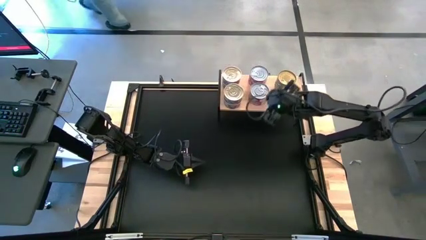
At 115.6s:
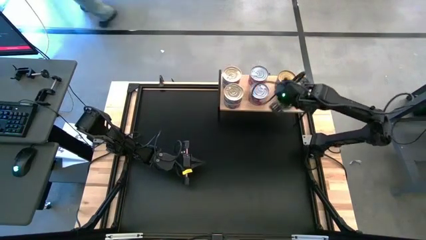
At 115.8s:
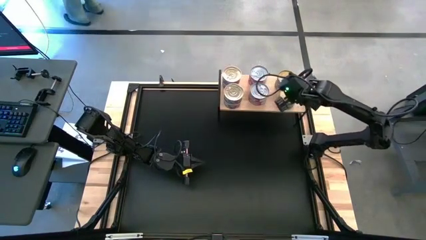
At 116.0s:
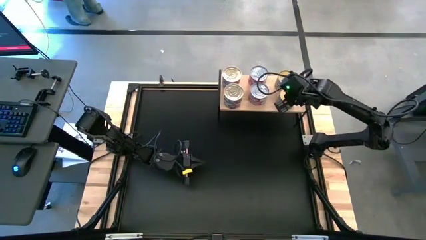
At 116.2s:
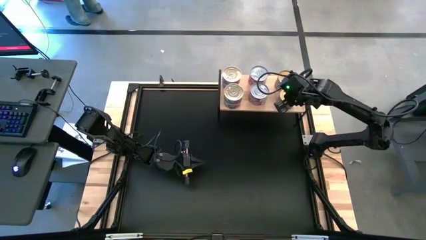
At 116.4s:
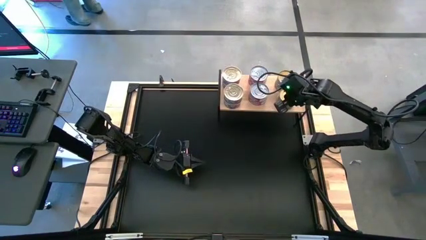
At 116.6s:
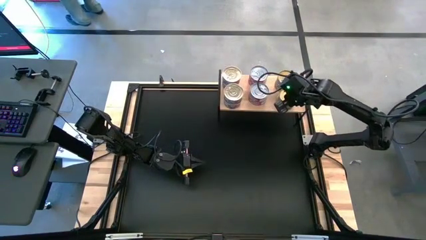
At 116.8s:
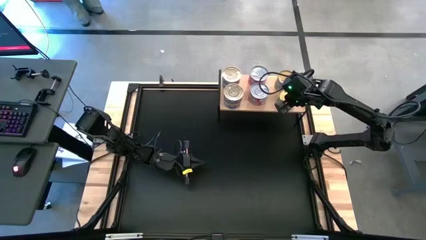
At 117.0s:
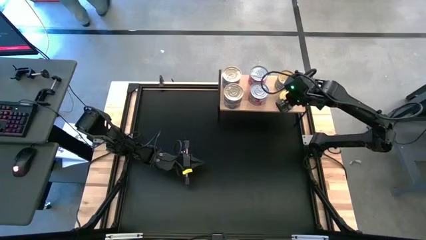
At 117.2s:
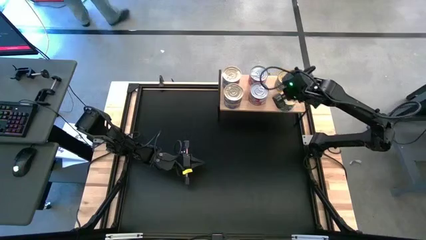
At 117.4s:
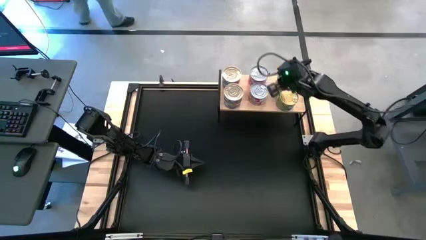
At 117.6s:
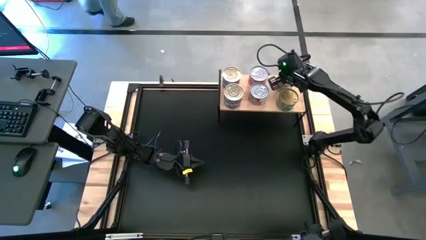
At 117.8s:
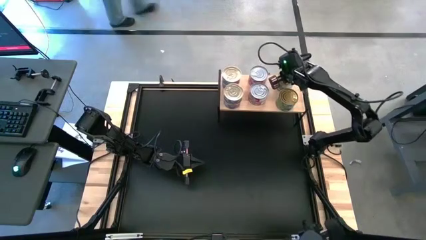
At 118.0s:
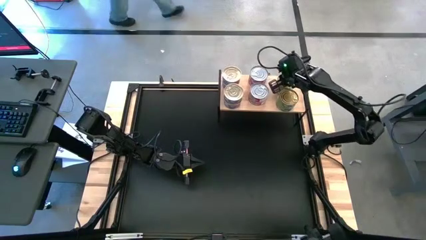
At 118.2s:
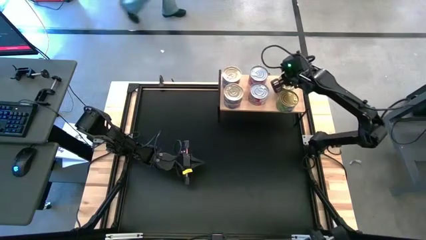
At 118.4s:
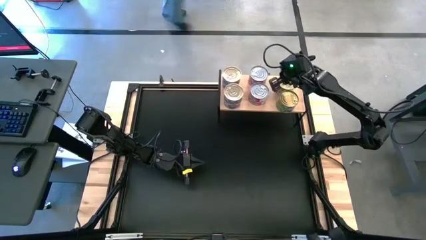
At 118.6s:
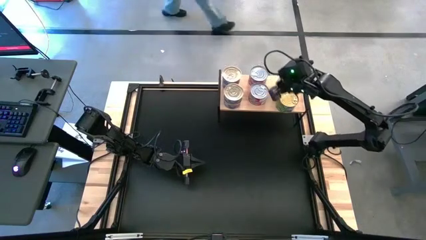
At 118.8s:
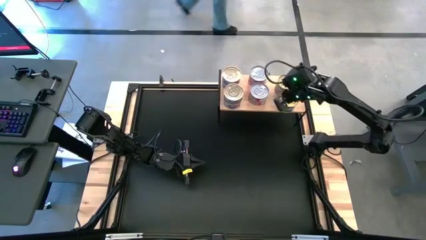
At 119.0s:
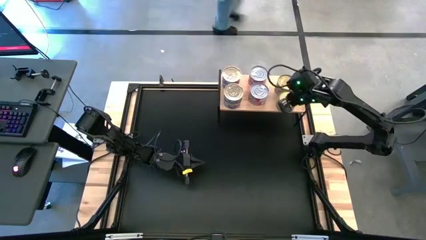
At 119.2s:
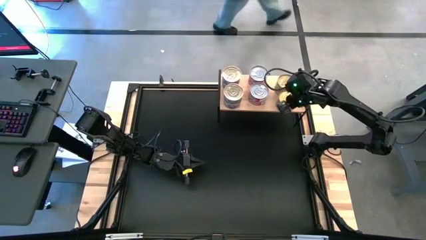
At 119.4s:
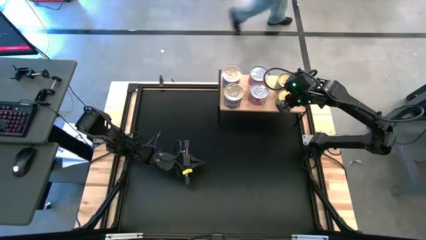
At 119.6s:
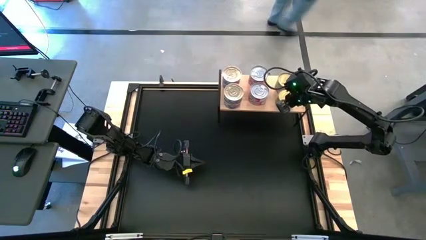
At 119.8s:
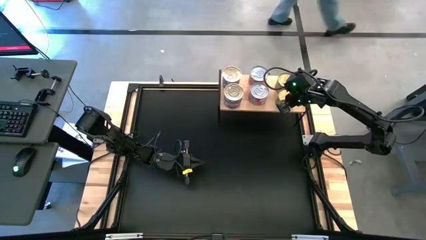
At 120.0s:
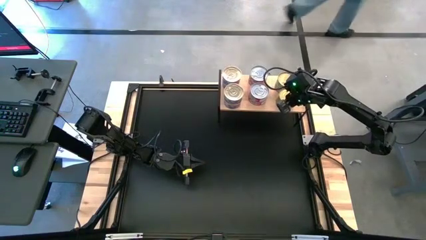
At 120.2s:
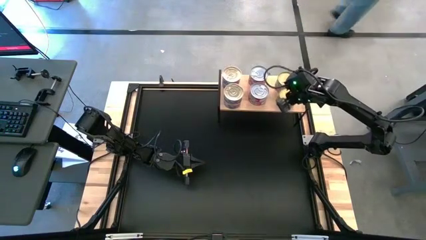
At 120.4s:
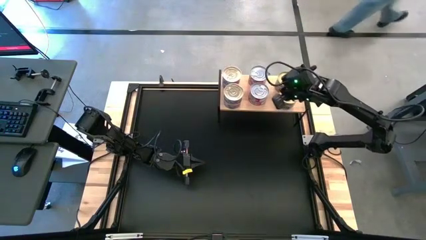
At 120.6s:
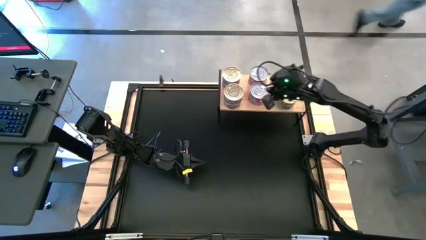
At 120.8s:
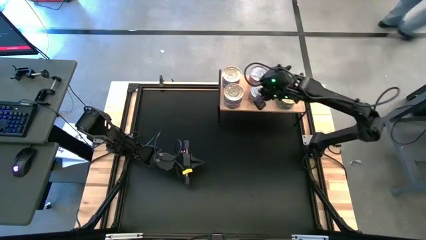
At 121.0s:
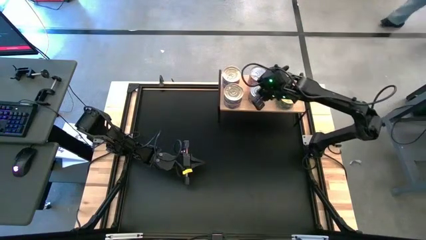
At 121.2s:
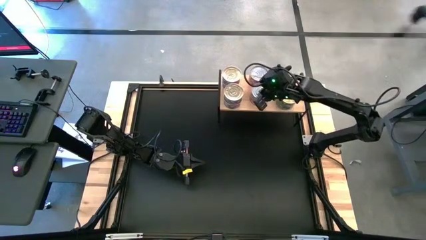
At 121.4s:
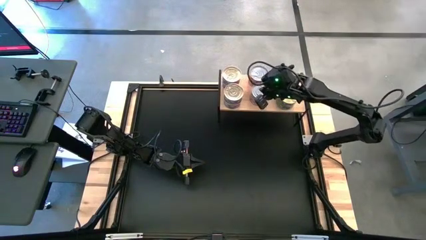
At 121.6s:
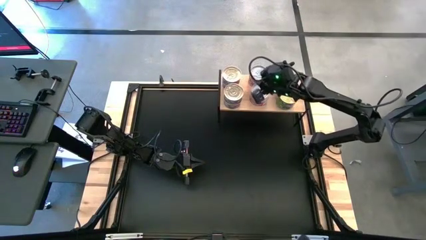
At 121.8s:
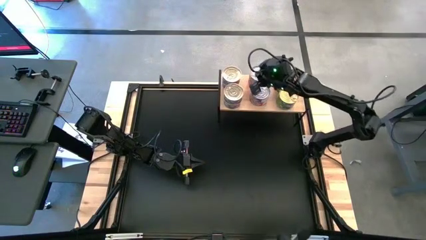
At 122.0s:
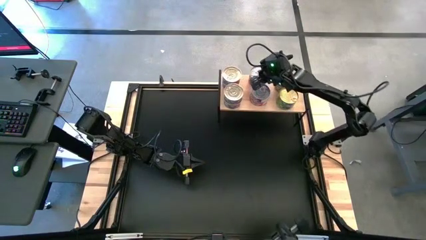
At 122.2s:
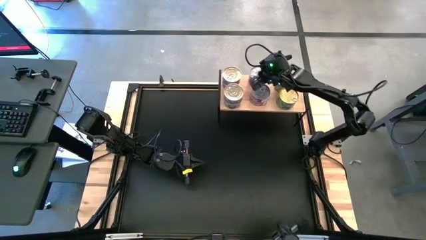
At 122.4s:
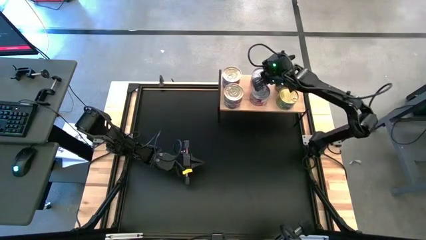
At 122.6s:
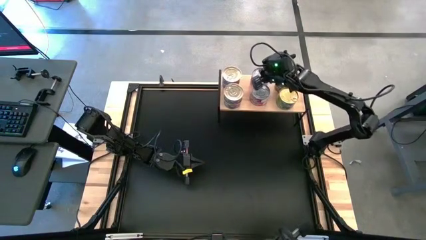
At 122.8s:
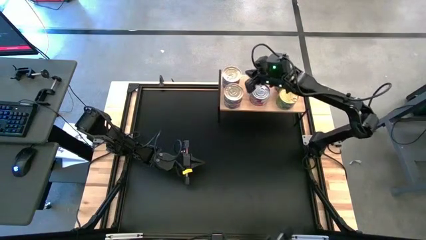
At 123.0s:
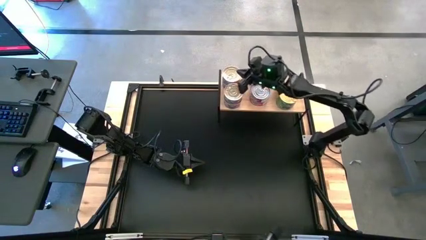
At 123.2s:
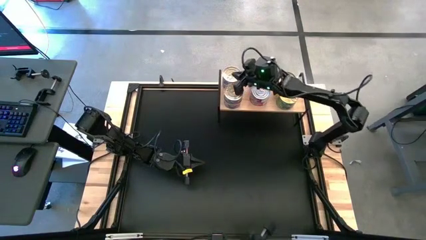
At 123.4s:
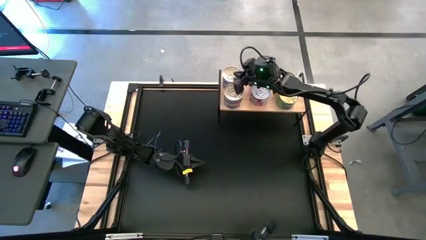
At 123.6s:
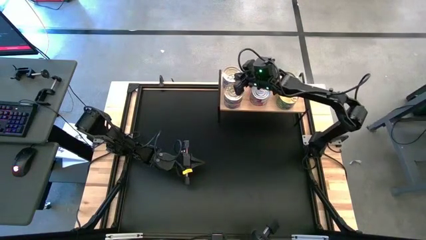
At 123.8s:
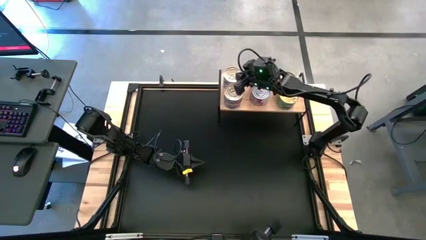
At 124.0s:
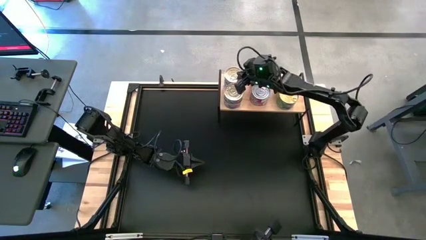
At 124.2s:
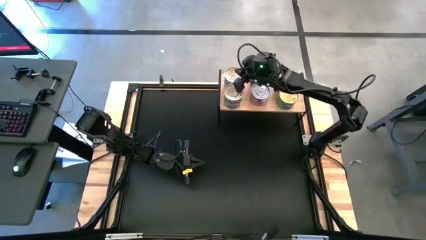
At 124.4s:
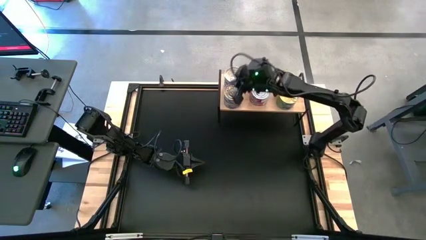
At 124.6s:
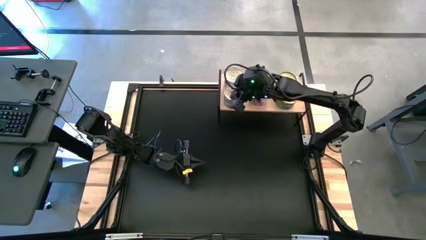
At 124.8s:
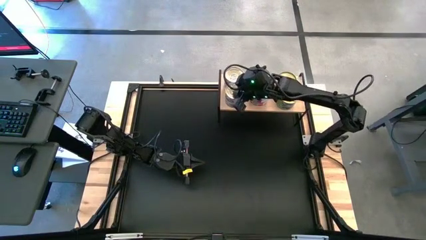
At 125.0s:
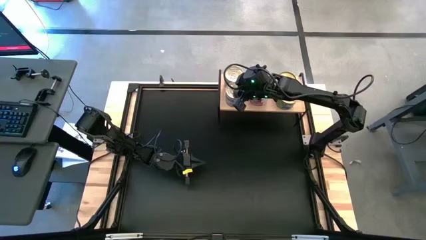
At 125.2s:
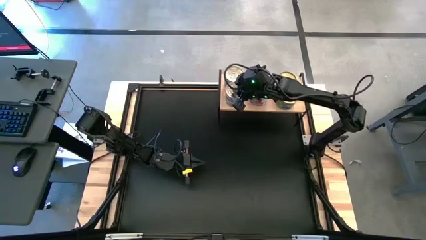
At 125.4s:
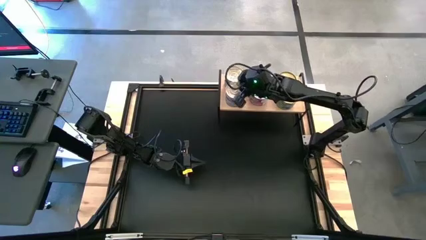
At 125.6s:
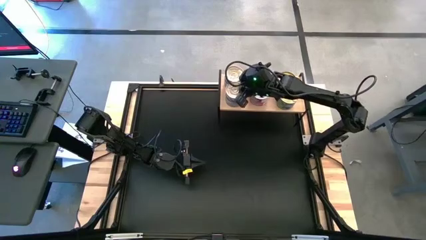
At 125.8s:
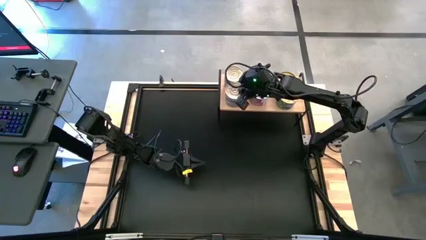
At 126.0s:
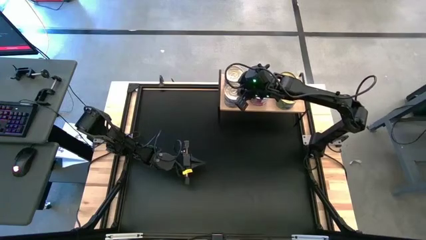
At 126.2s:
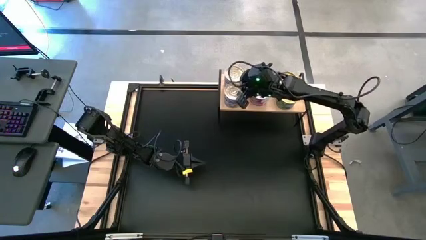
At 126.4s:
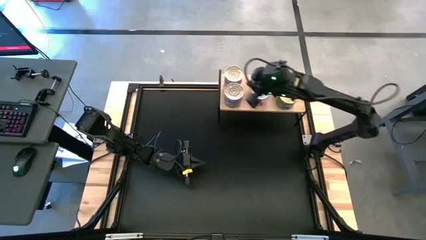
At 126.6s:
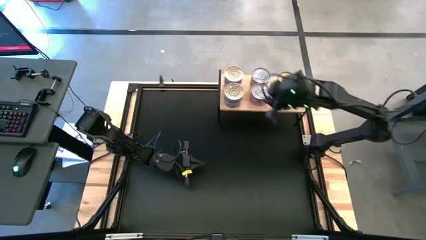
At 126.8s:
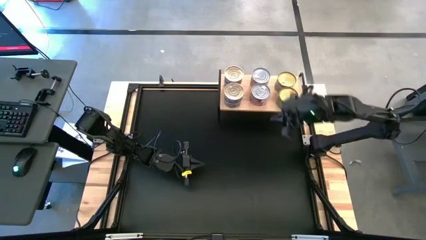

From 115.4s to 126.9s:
Task: Stack canned seafood by type on shelf
Adjust the stacked tuna cans on the shelf

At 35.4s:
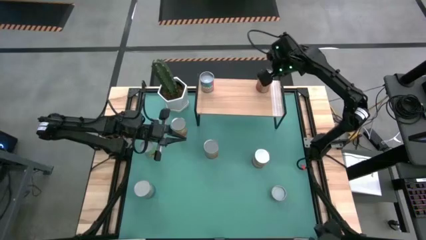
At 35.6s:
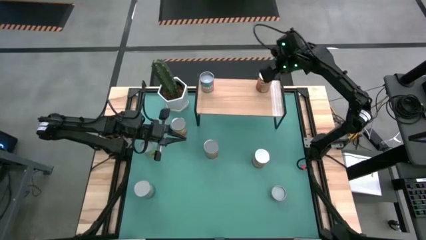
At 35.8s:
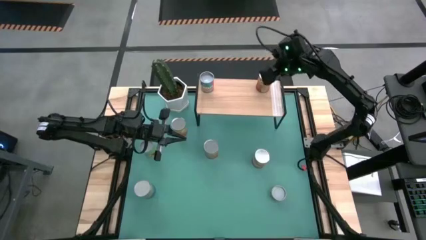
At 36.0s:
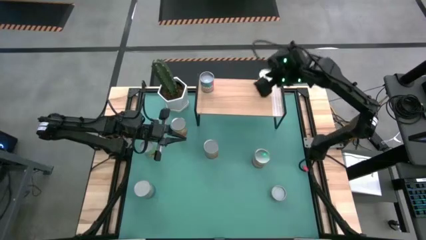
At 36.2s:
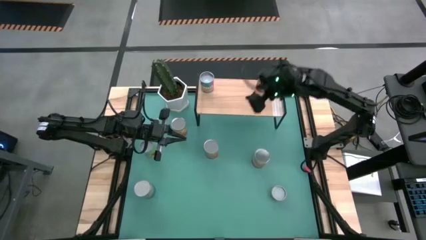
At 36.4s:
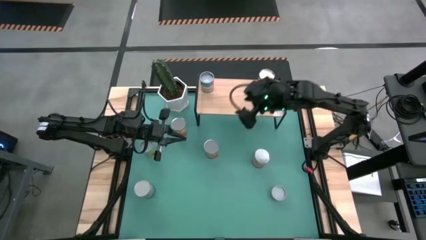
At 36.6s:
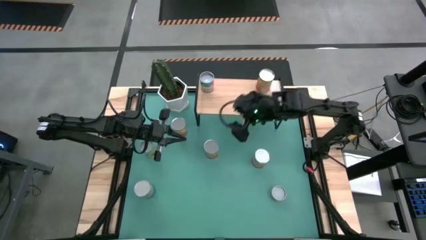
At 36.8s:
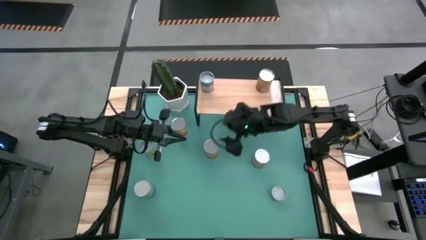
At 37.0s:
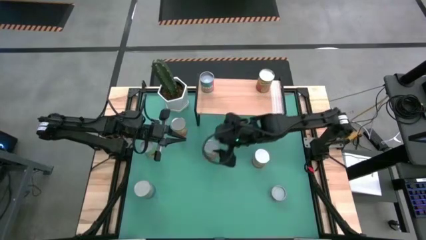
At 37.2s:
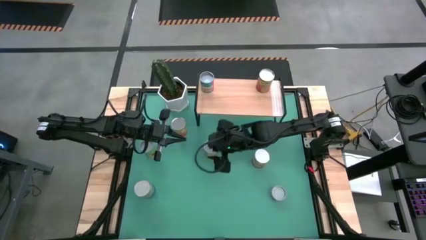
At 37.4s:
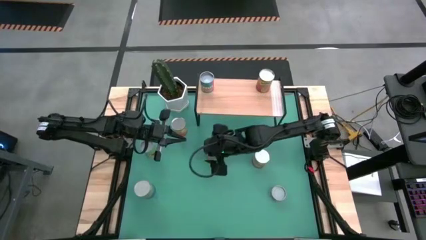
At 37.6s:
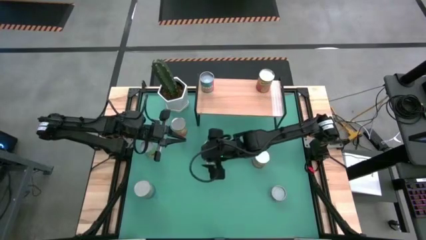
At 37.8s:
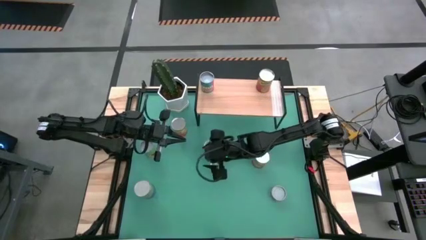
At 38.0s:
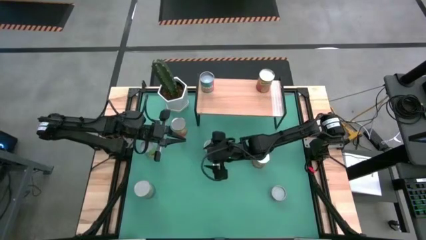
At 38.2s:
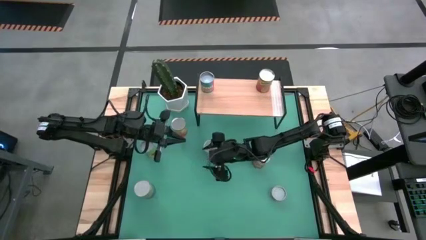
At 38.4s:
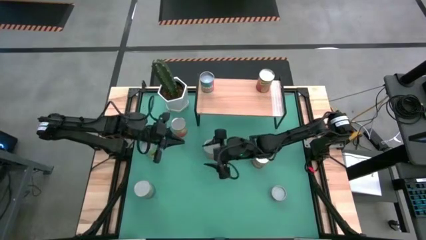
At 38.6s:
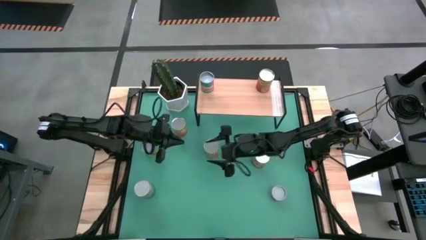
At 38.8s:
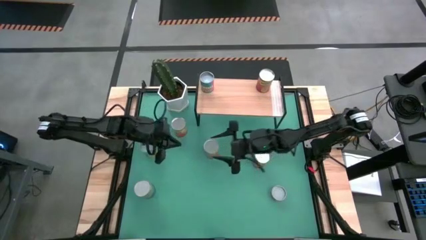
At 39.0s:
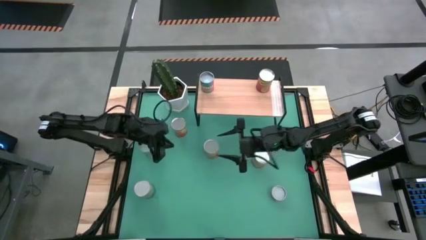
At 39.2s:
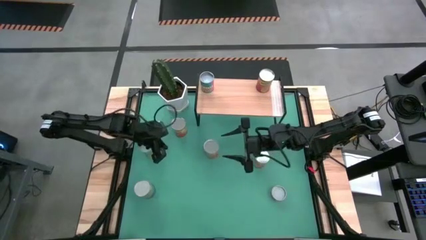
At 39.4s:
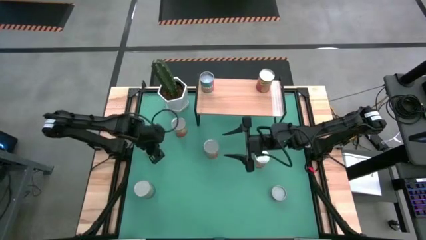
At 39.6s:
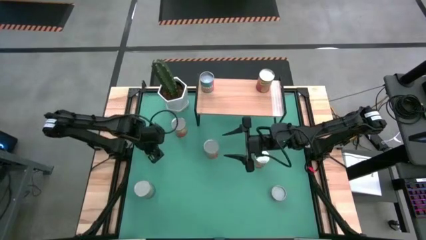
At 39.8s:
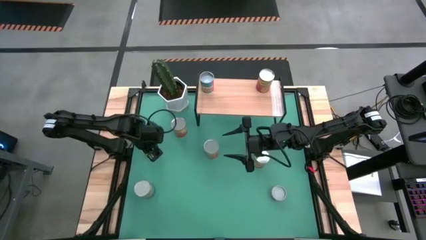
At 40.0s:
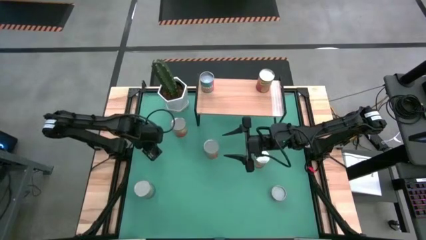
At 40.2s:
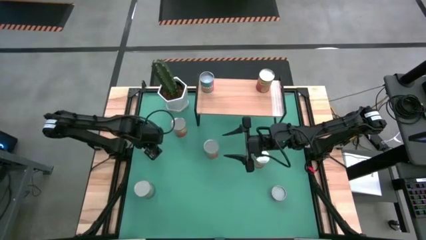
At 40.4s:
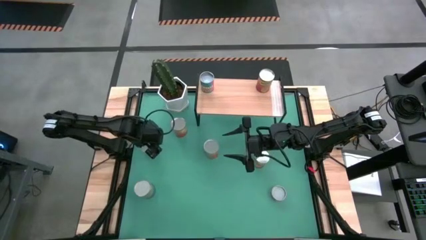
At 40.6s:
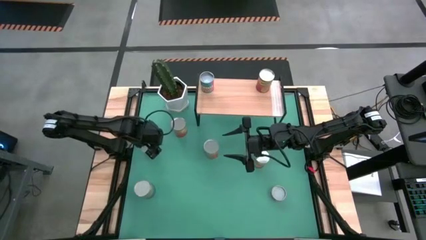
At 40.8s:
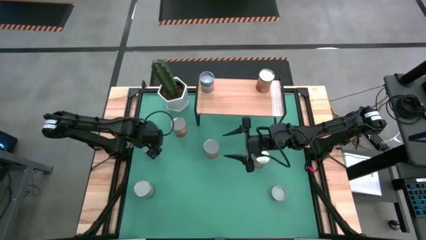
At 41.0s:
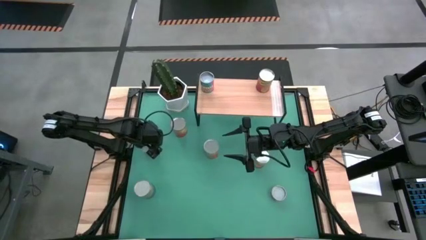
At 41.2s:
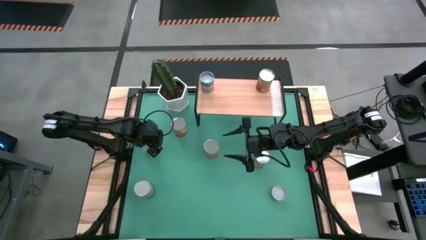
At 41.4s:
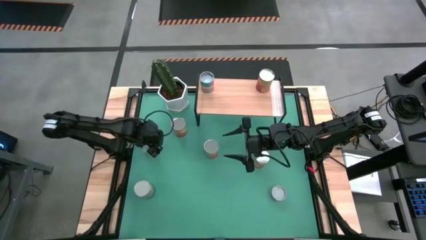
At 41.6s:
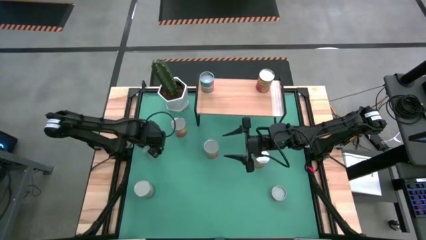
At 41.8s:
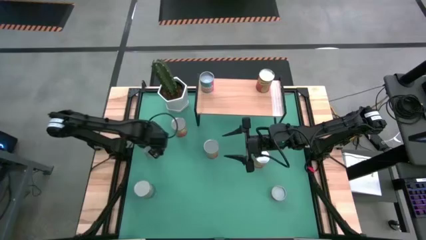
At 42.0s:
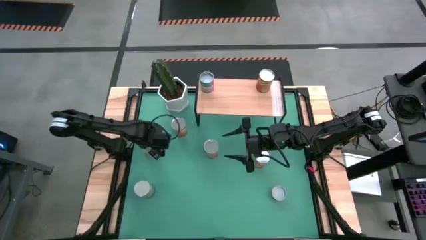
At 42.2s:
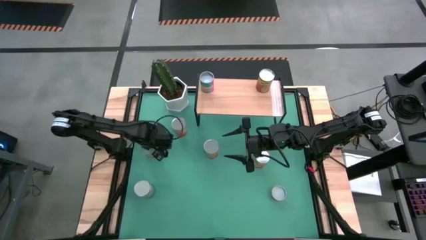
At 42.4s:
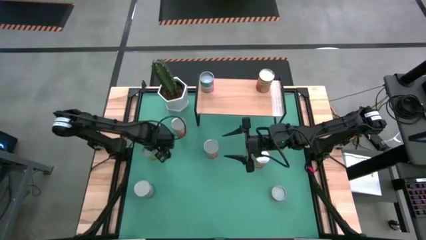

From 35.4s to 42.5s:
Task: Pick and place cans onto a shelf
Put the canned spaghetti sauce on the shelf
